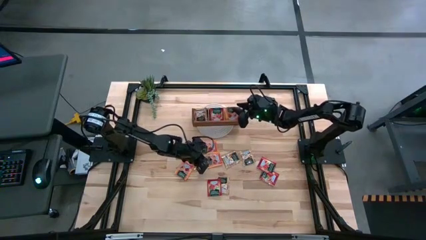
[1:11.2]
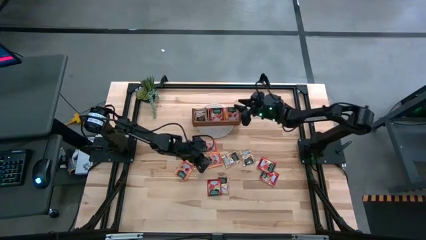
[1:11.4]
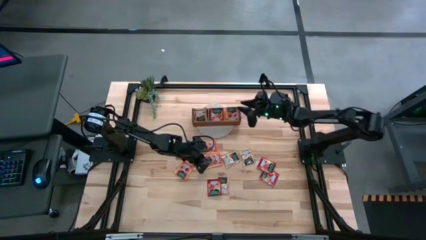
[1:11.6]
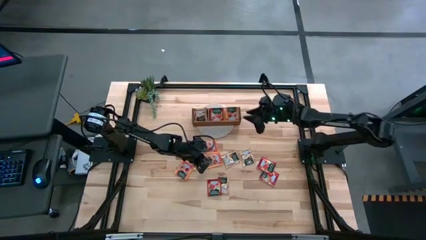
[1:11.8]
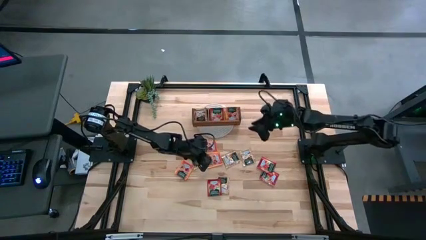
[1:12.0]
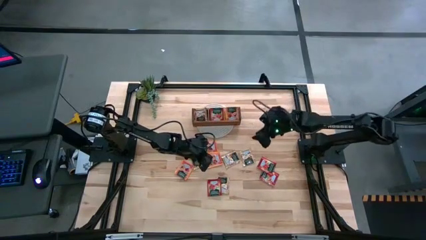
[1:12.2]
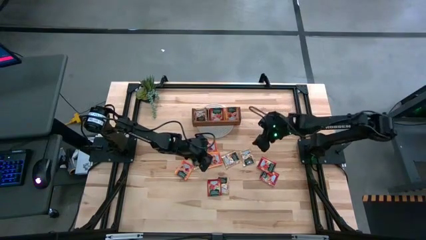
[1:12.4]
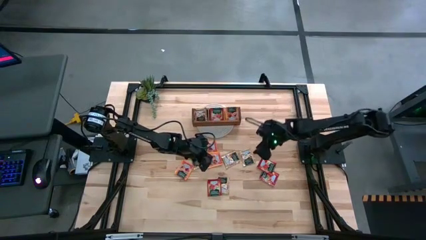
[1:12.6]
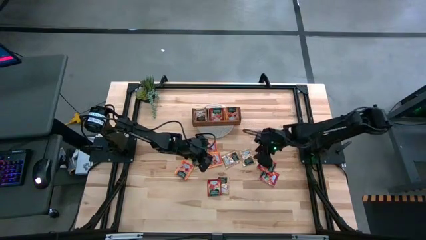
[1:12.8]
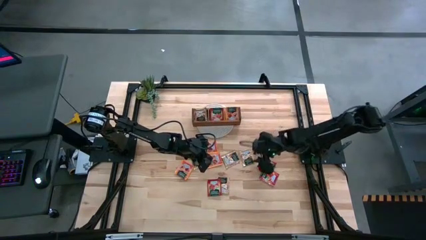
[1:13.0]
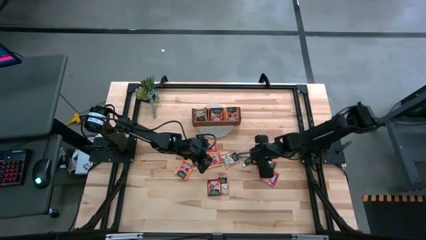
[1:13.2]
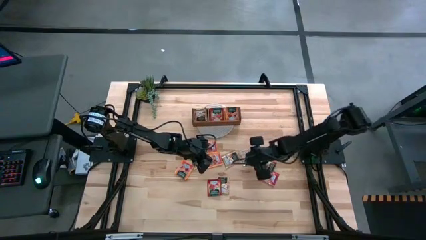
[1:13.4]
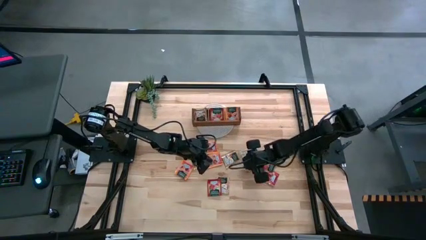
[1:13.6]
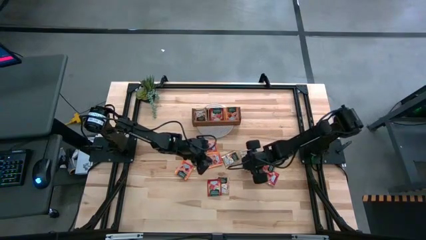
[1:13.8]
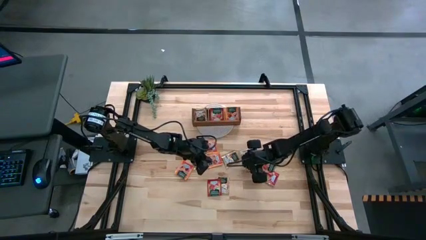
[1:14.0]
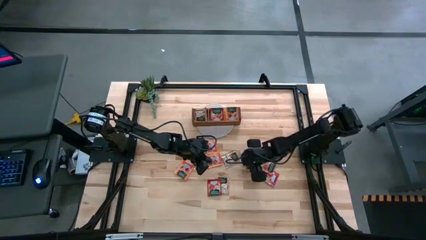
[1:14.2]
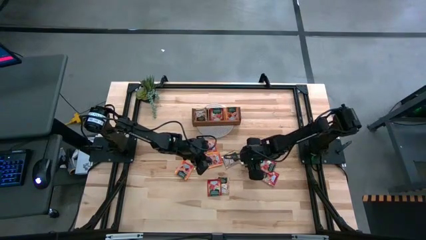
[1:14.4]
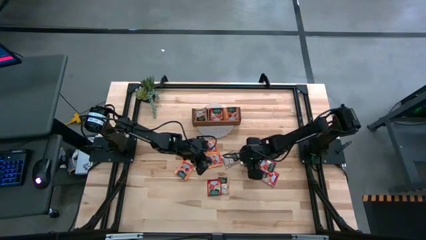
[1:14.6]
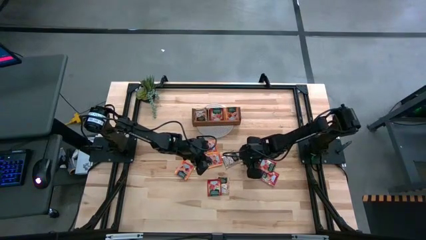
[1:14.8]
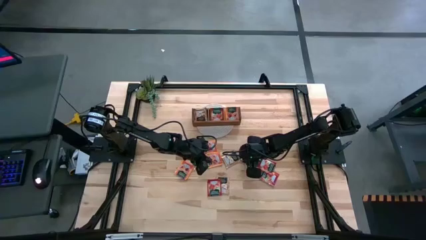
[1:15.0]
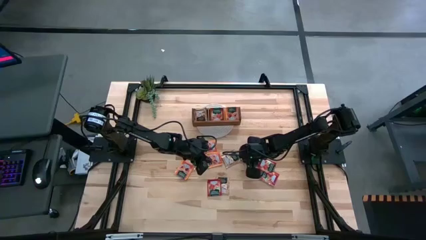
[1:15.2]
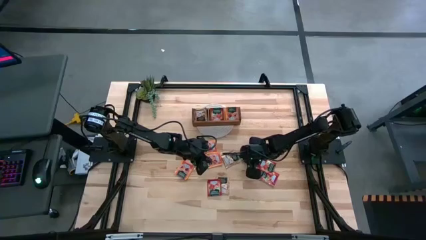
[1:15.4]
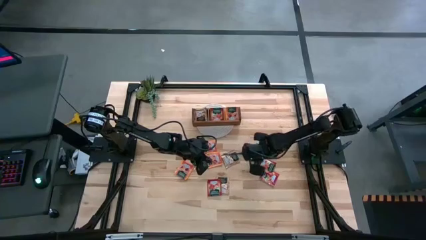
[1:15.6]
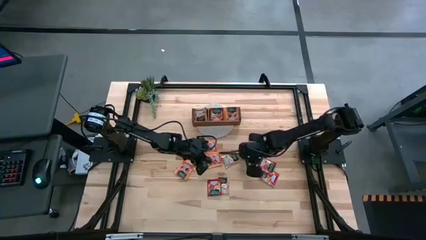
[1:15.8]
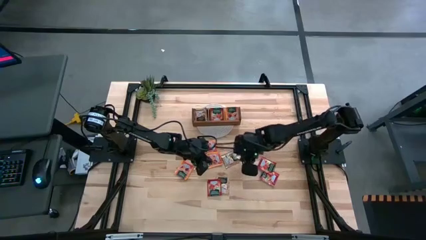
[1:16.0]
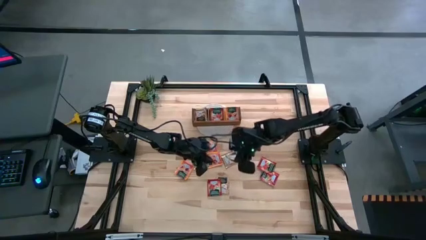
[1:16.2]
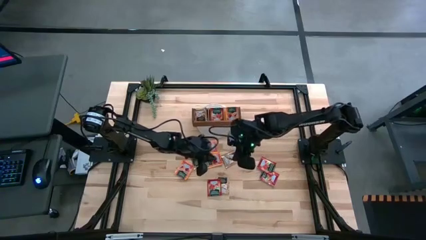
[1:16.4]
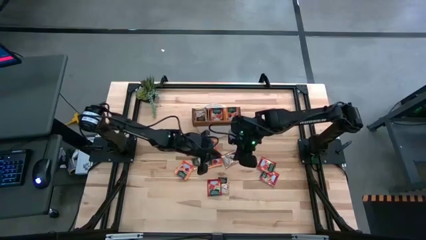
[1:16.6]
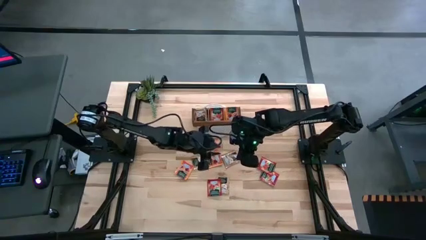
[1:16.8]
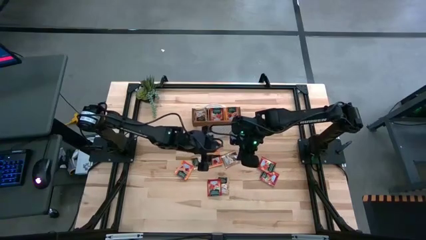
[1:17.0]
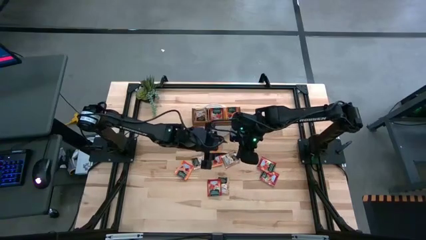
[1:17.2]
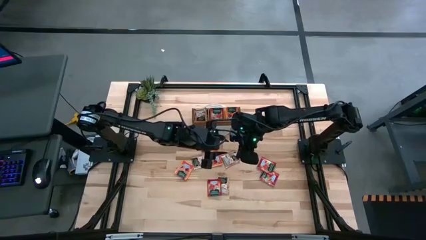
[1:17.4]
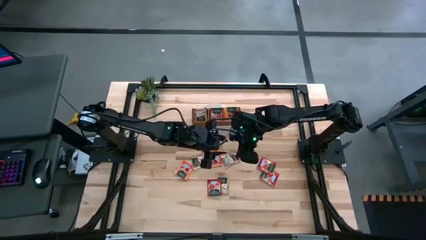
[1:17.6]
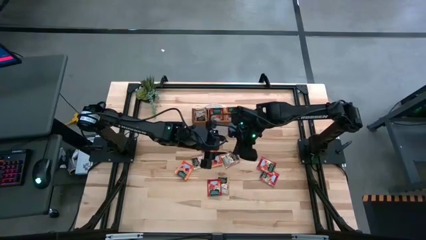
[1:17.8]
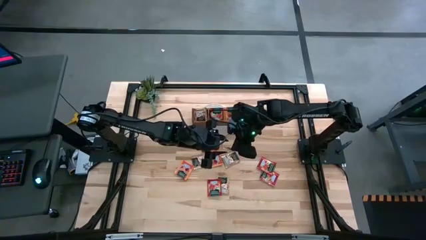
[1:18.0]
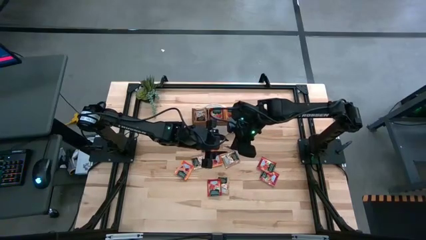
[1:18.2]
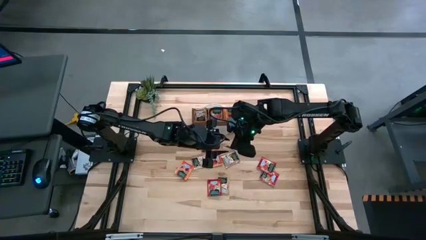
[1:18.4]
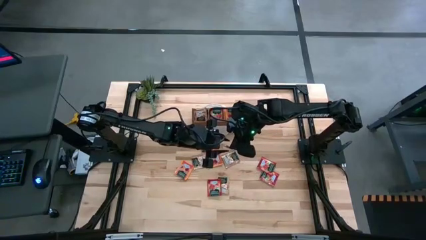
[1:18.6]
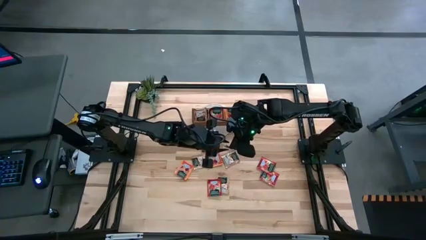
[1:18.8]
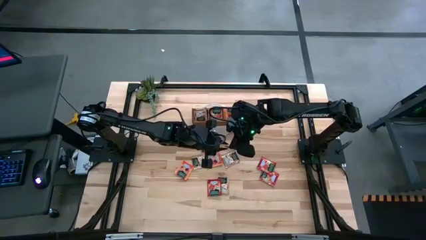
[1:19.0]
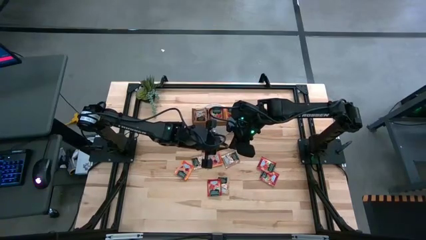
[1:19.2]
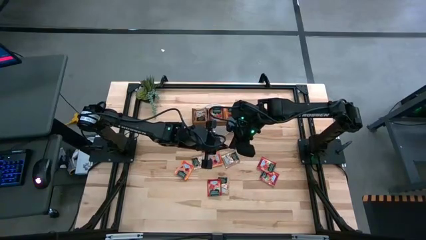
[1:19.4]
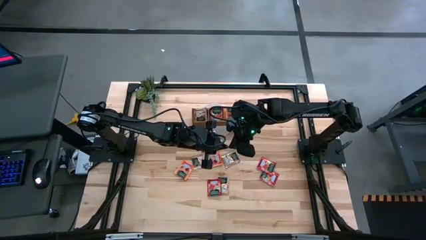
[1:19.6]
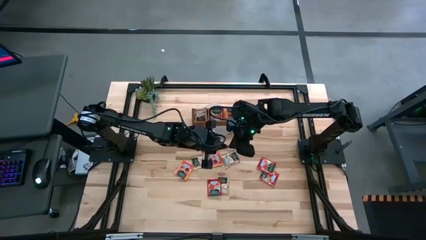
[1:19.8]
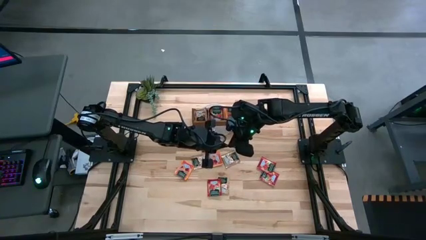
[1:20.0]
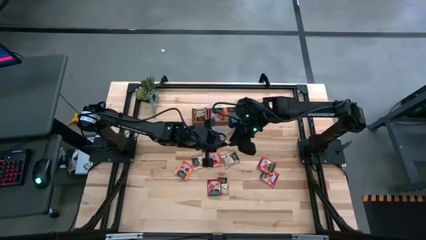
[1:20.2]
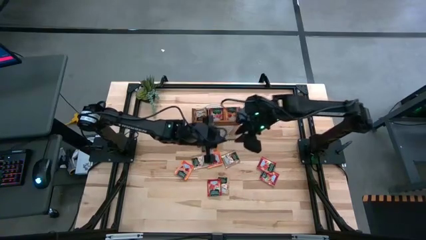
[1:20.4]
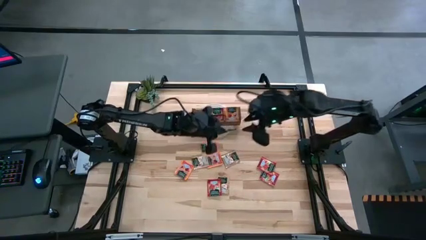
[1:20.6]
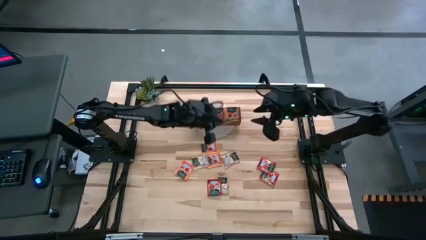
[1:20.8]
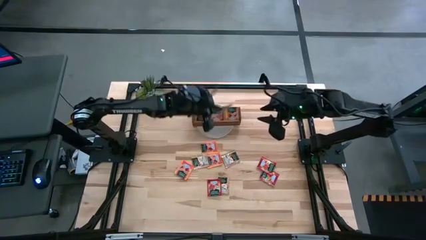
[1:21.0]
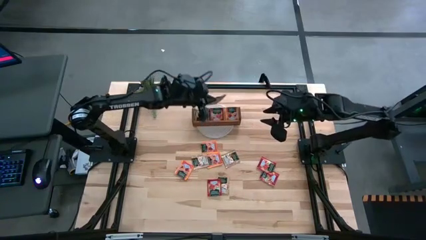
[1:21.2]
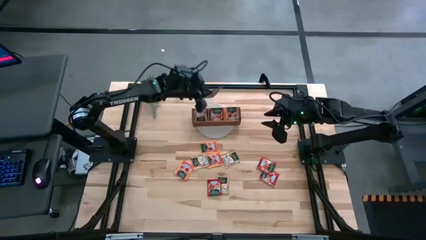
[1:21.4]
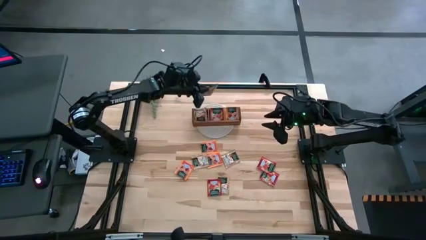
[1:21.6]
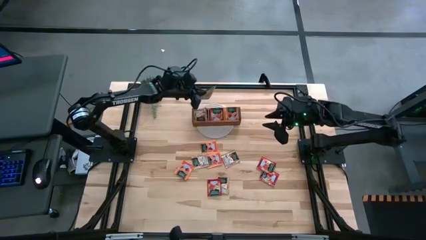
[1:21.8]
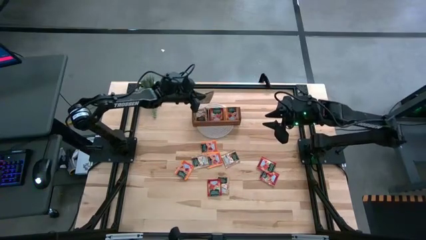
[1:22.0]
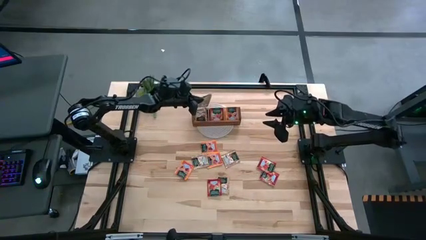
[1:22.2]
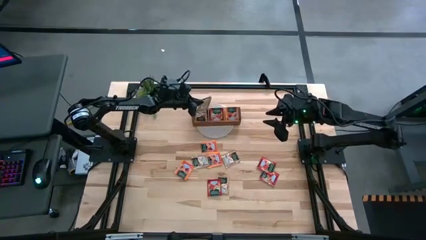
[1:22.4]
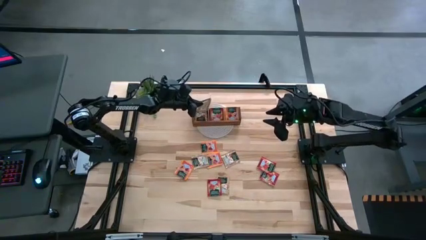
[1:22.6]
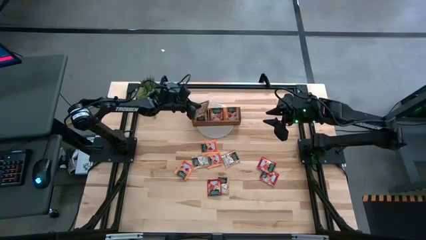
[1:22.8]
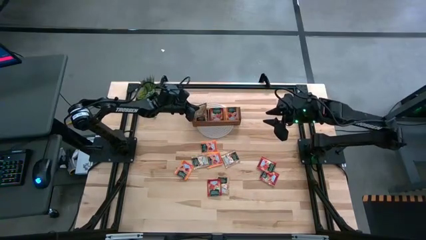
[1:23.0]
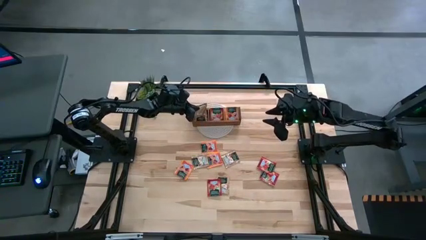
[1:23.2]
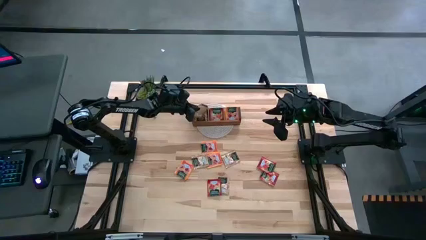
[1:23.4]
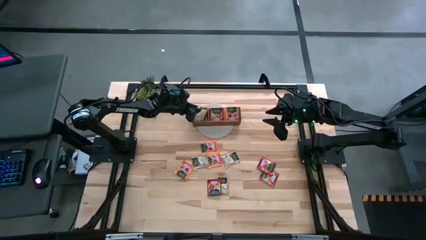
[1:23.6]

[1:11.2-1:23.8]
Task: Pick & Place Tea
Put the brown tea bag in the left section of the wooden organizer

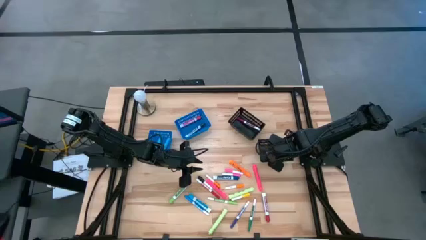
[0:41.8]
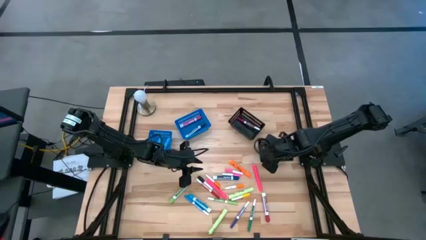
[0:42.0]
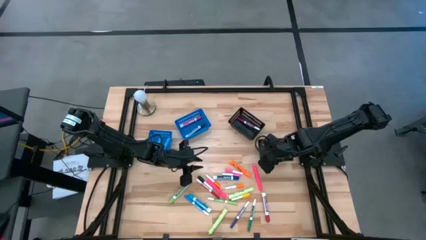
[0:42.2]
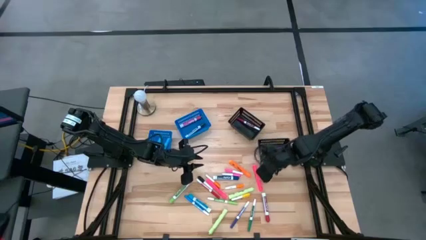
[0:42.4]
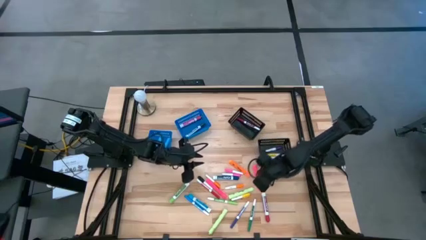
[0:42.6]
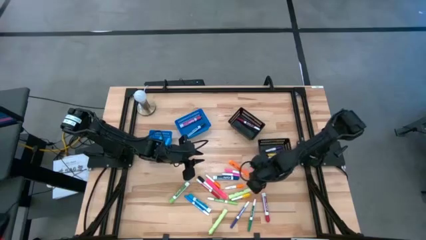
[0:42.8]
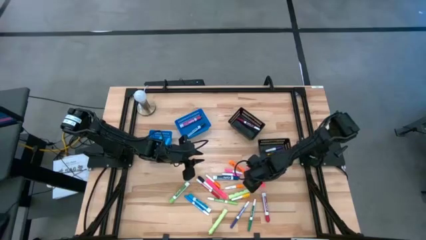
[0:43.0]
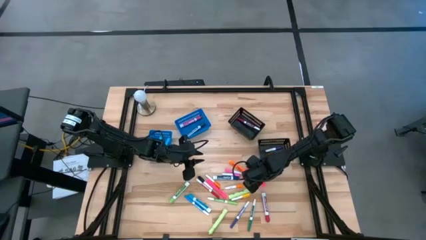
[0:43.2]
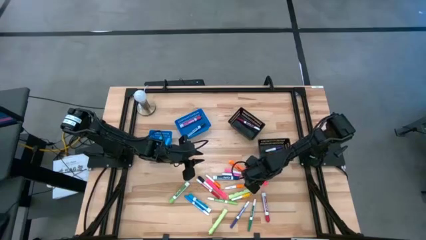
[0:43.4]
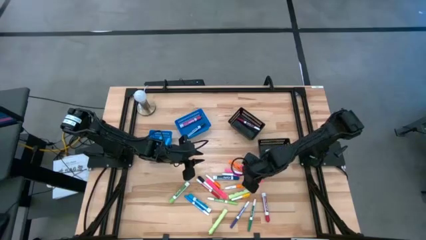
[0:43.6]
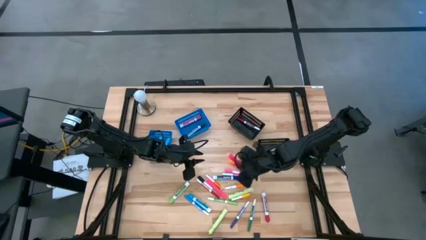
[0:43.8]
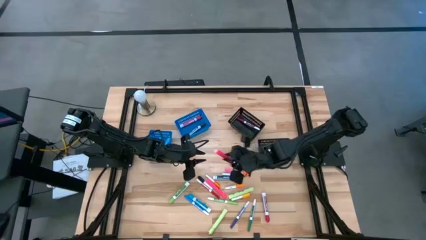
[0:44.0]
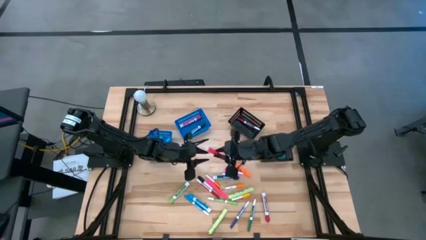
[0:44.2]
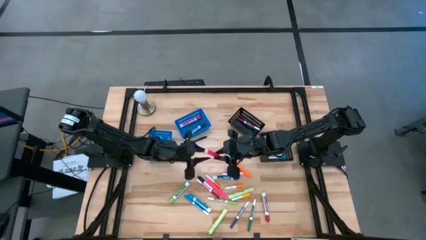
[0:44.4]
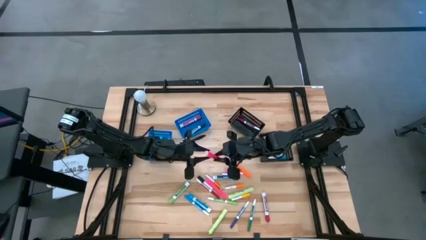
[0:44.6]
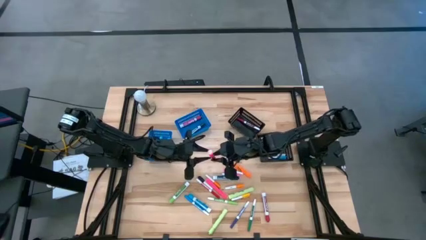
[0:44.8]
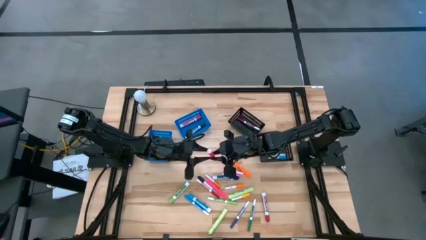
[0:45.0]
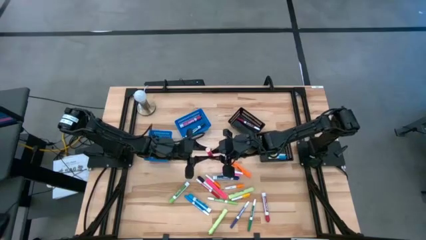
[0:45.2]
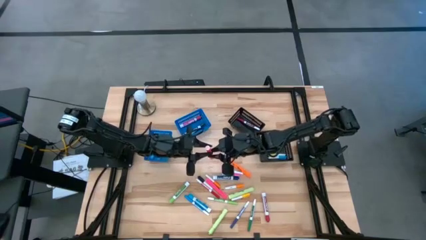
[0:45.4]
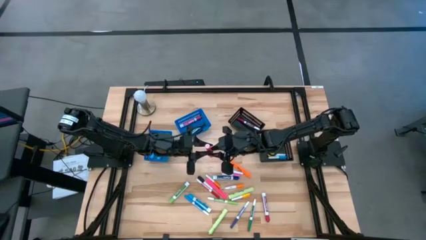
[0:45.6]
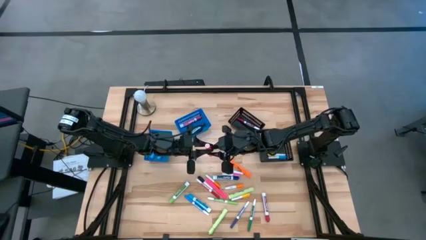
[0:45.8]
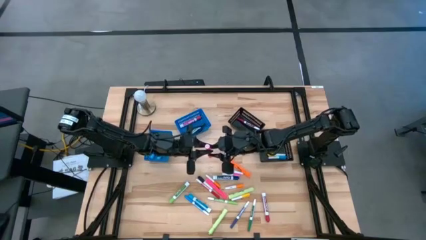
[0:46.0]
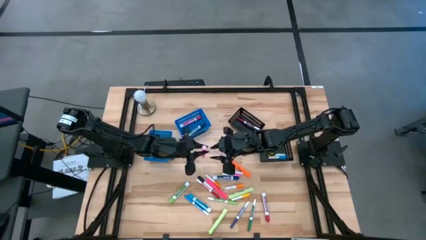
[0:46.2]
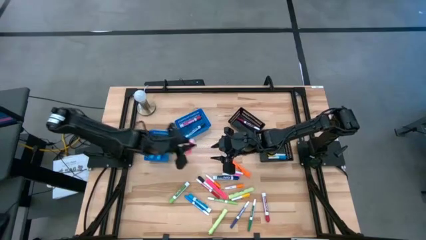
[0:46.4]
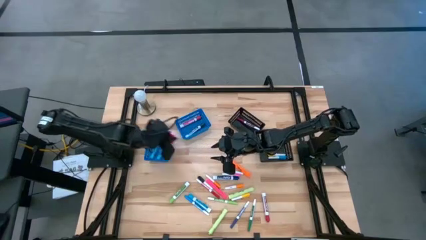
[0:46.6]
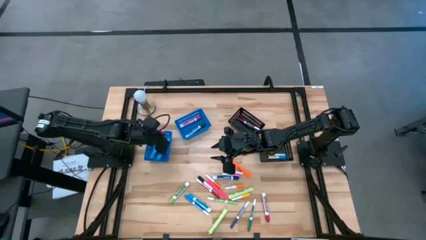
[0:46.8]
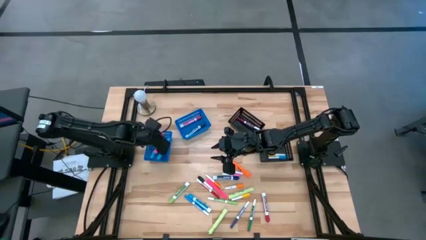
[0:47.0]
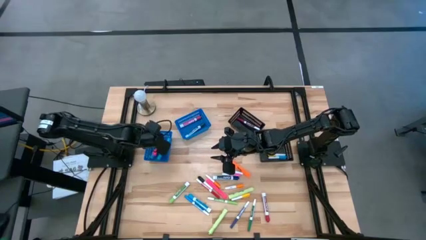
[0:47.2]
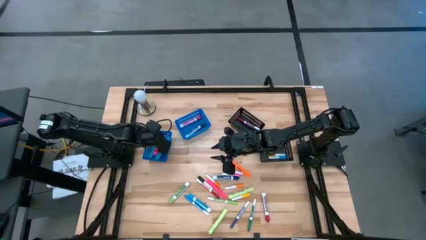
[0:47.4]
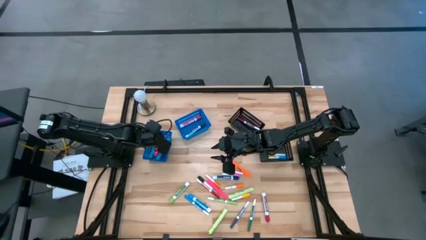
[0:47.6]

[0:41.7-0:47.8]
Task: Pick & Place Markers
Put the right pink highlighter pen into the left blue bin
